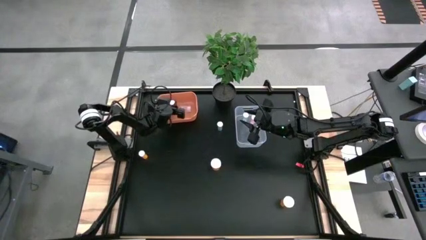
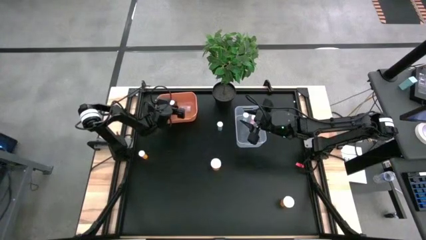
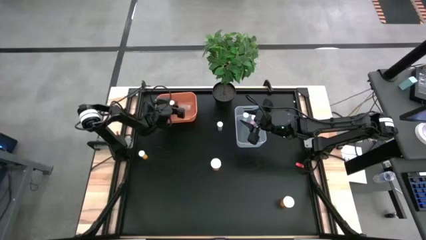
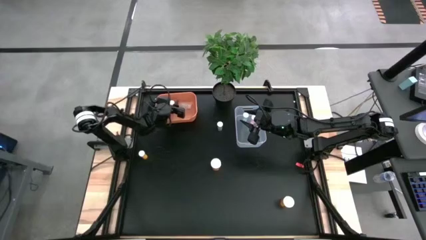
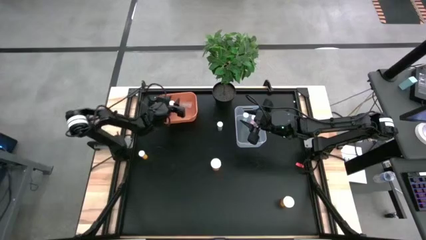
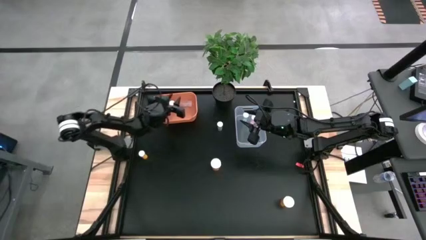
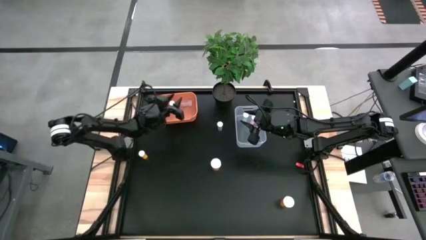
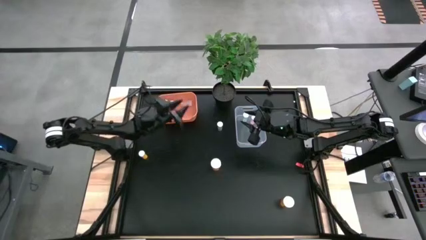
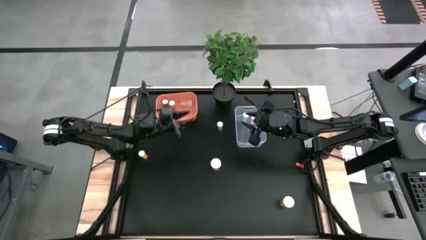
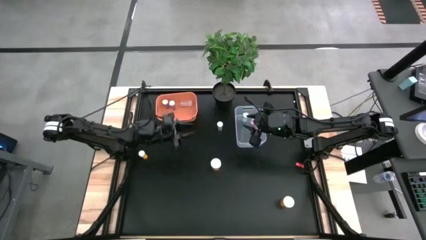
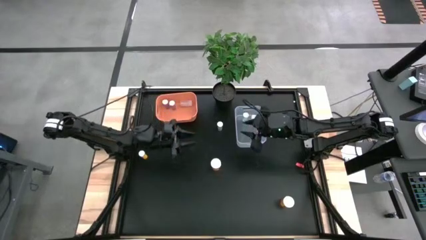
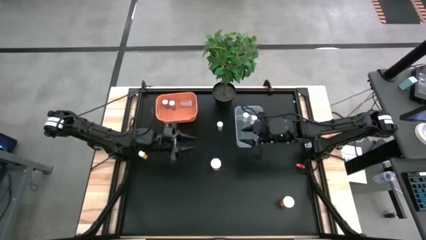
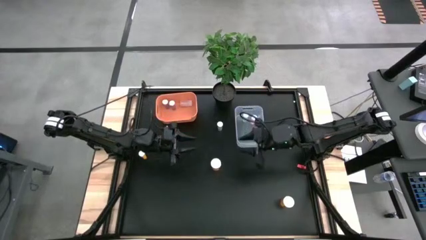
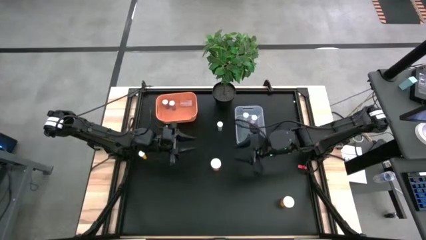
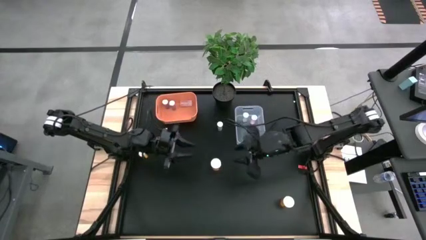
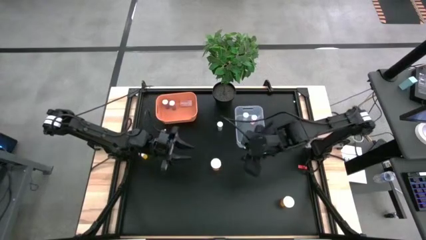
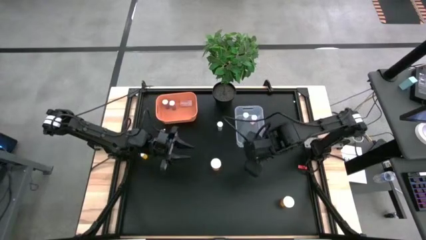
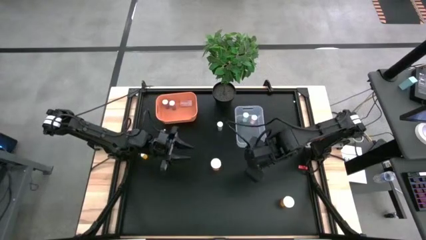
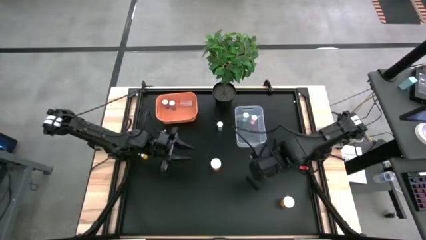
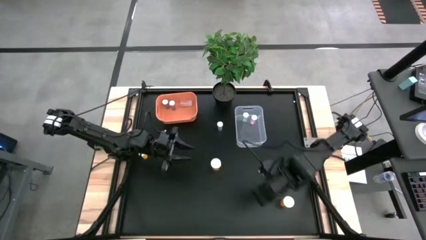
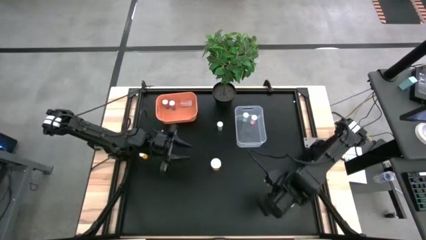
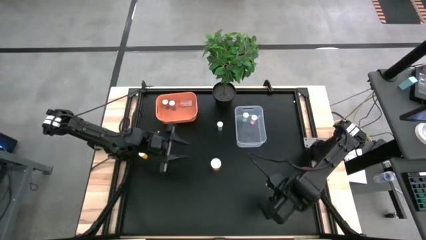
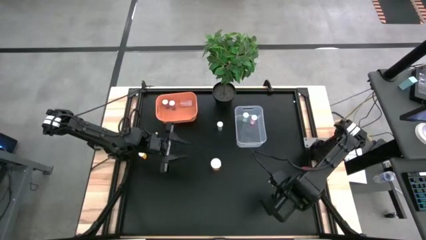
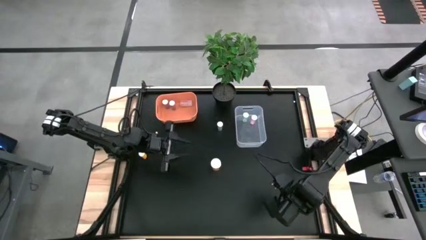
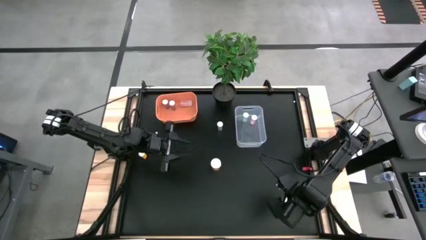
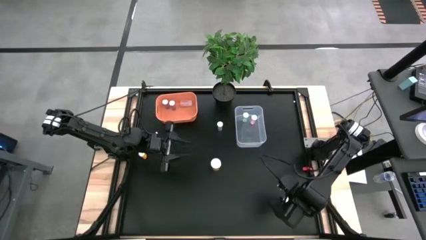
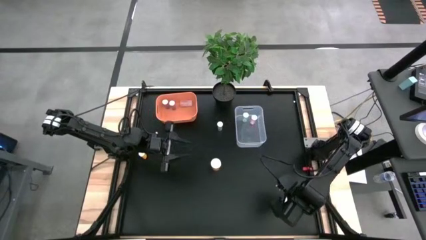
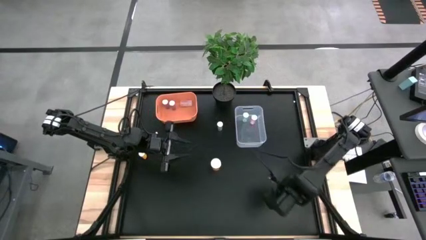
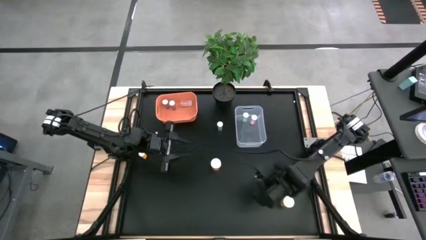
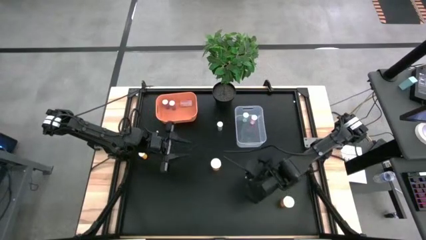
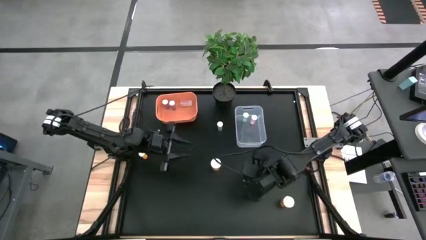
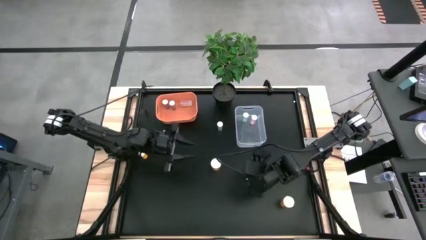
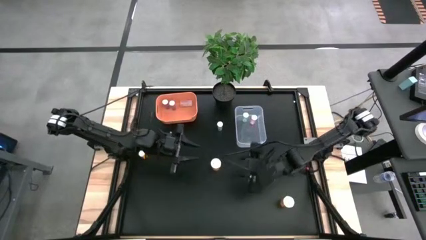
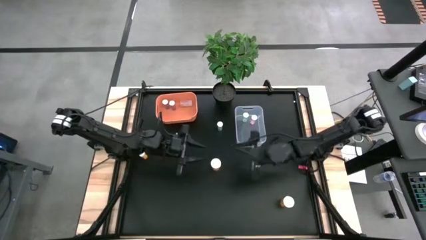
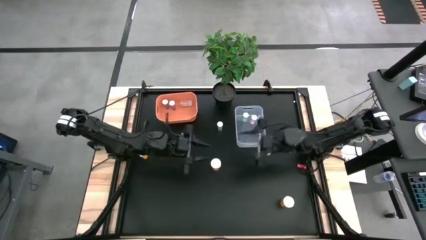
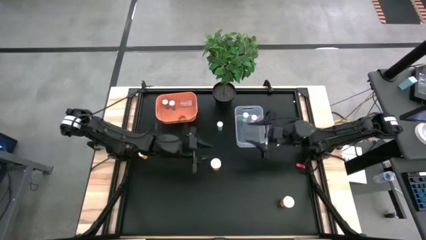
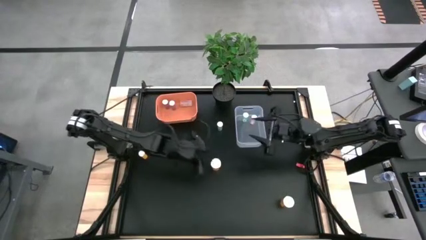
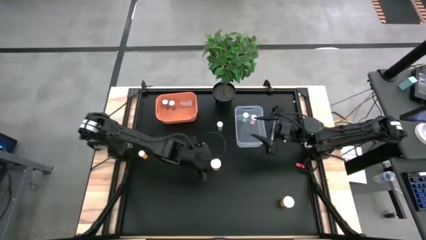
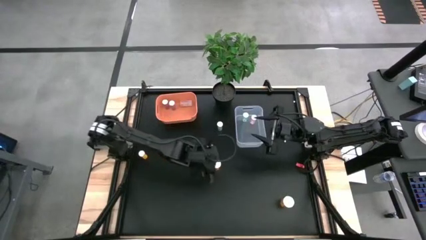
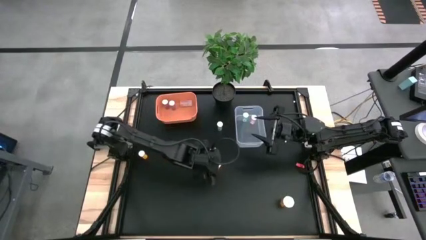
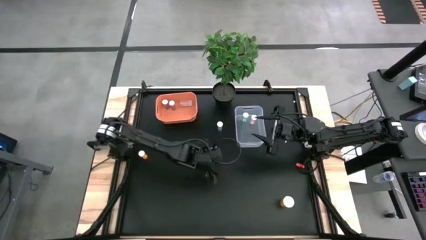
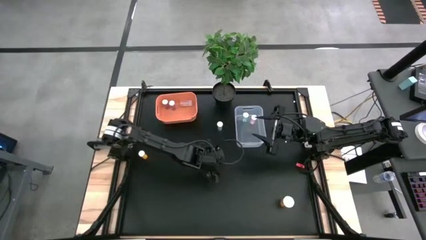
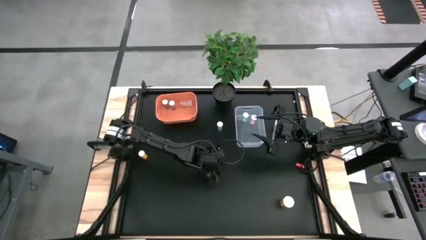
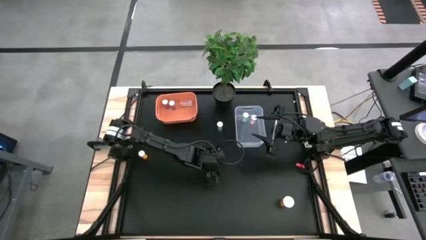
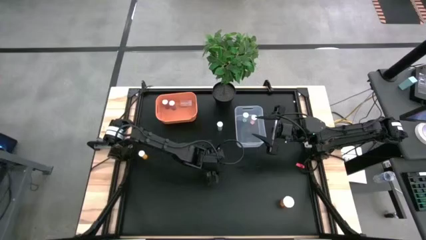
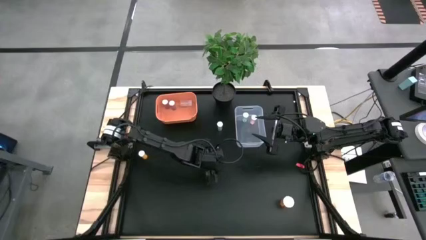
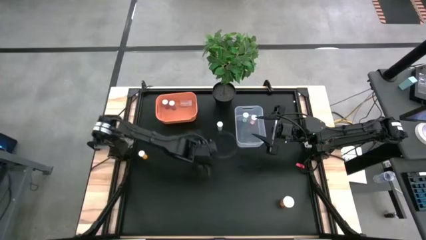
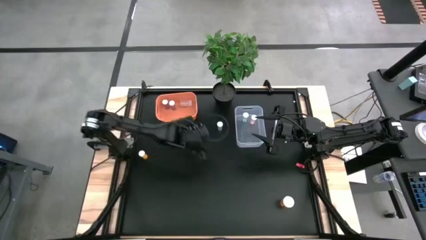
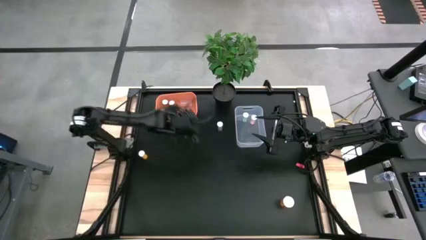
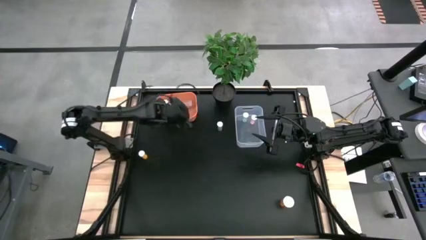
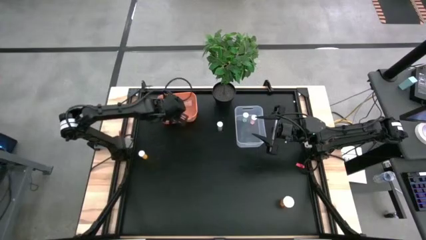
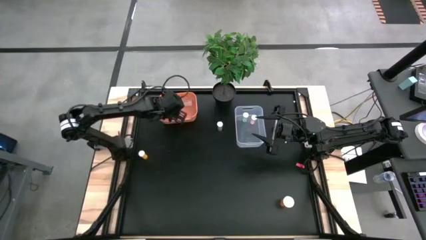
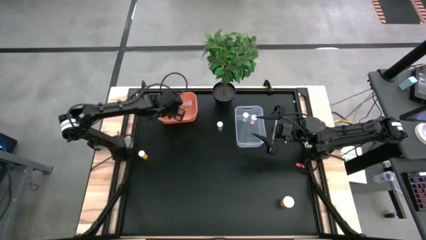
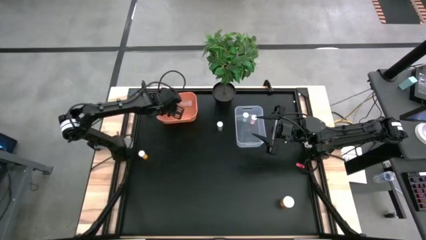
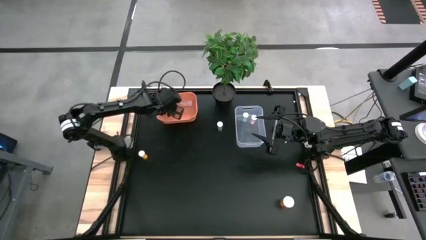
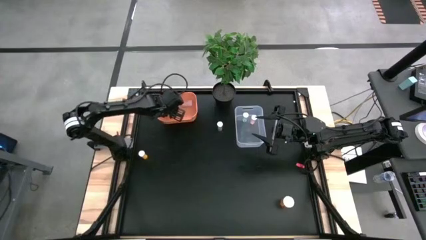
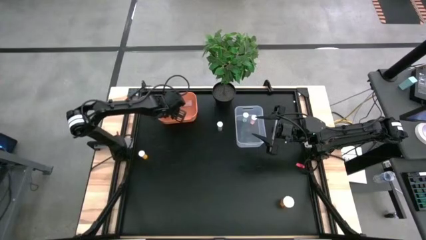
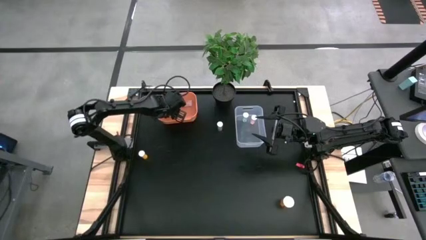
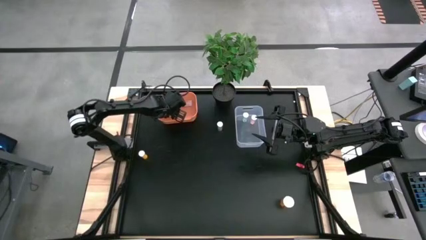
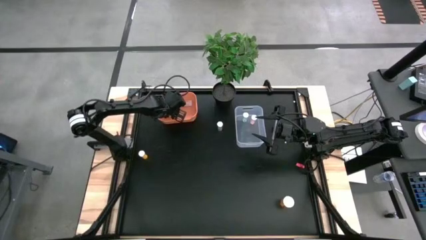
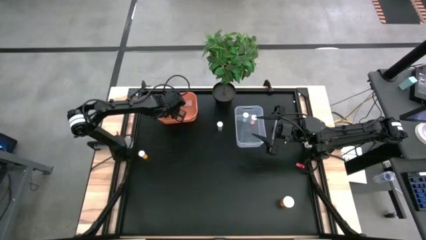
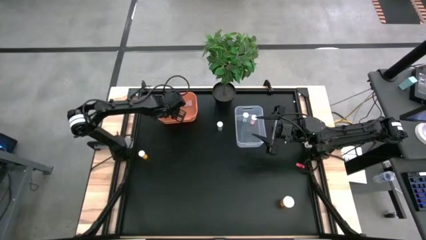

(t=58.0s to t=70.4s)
Task: Pick and place medicine bottles into bin by pill shape (circle, oval)
Put the orange tablet pill bottle into the orange bin
